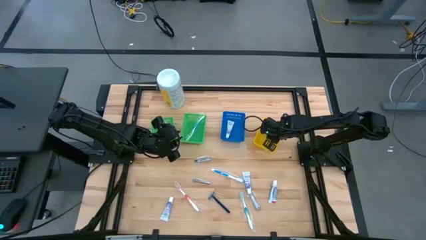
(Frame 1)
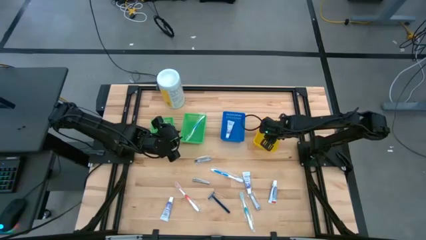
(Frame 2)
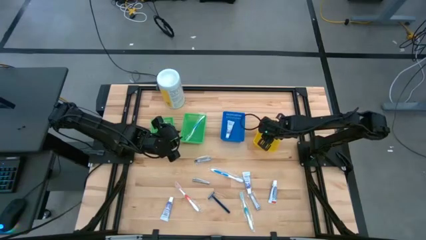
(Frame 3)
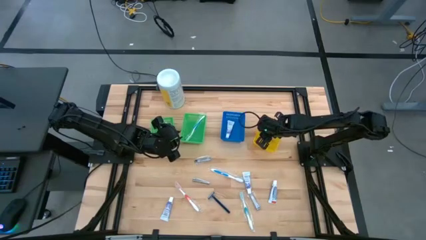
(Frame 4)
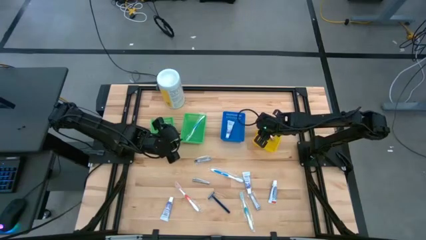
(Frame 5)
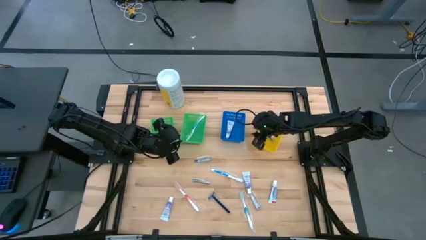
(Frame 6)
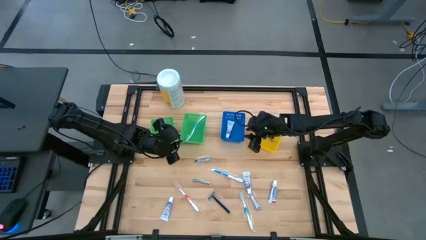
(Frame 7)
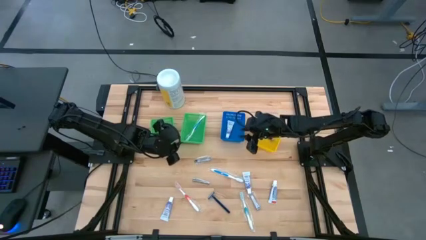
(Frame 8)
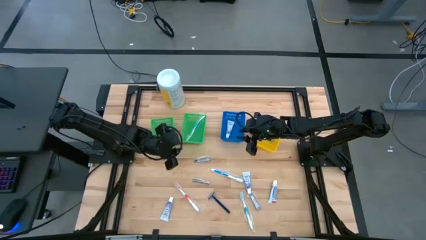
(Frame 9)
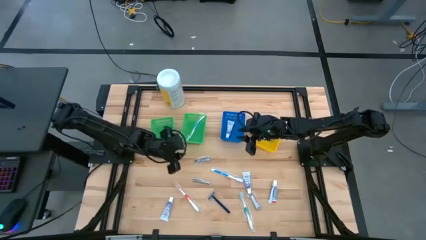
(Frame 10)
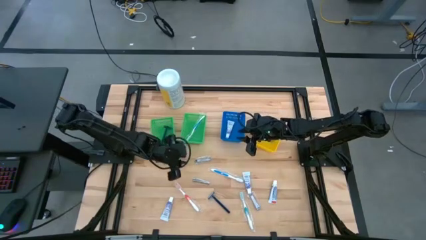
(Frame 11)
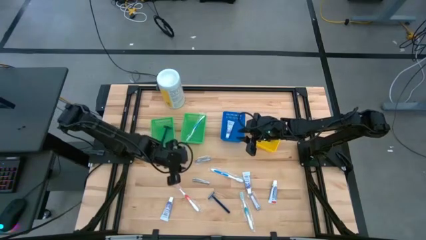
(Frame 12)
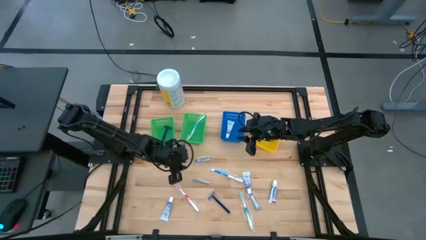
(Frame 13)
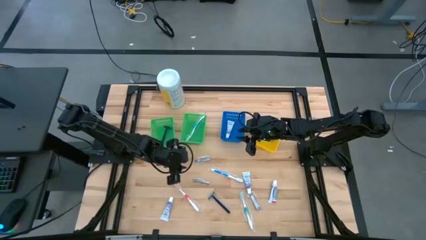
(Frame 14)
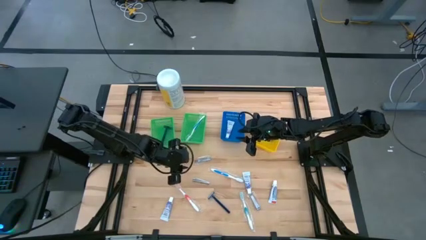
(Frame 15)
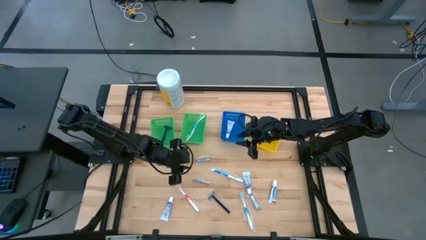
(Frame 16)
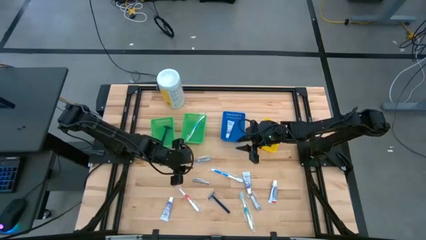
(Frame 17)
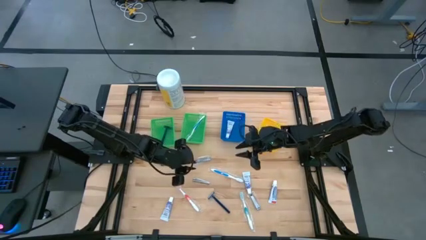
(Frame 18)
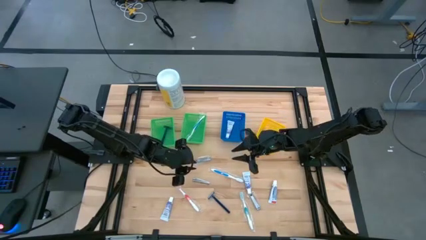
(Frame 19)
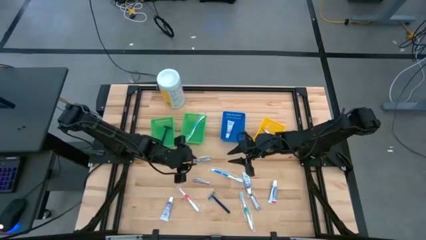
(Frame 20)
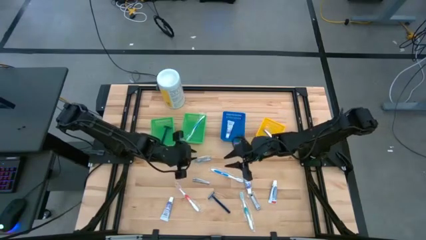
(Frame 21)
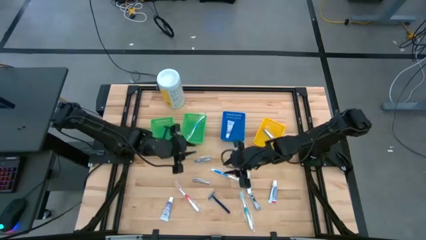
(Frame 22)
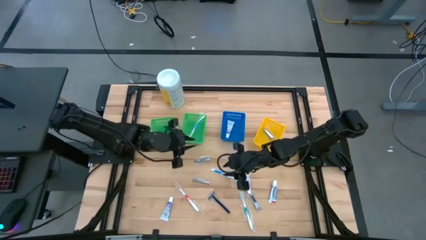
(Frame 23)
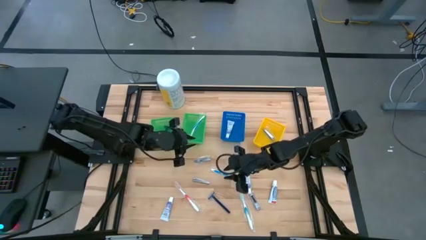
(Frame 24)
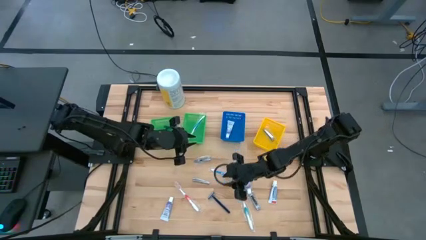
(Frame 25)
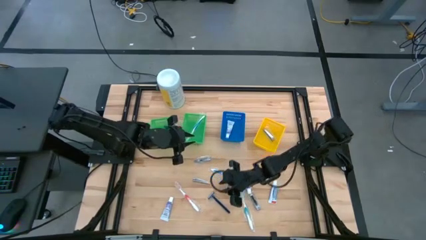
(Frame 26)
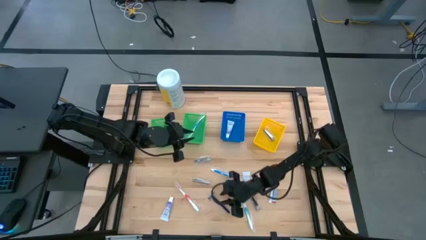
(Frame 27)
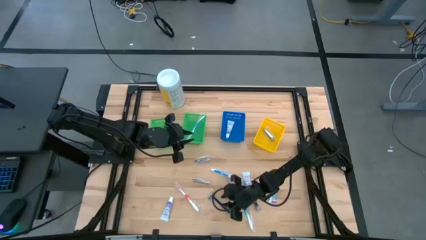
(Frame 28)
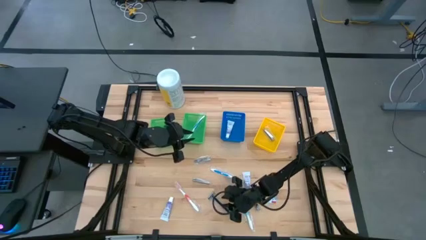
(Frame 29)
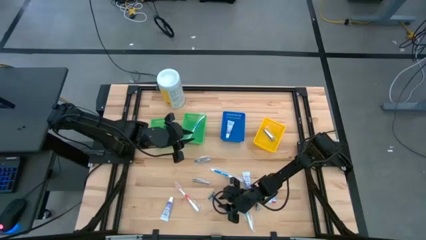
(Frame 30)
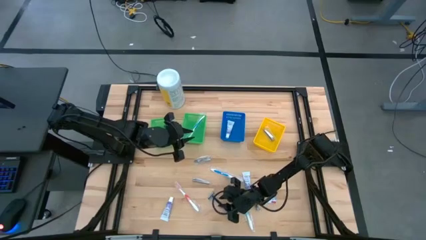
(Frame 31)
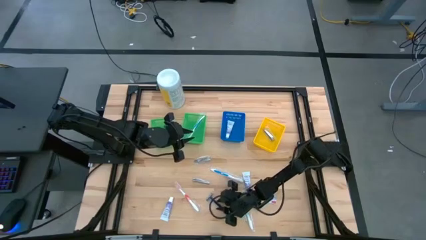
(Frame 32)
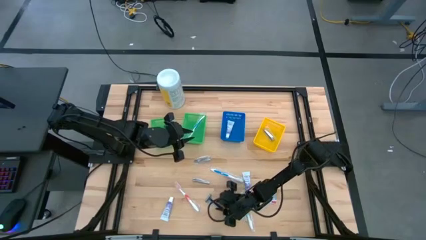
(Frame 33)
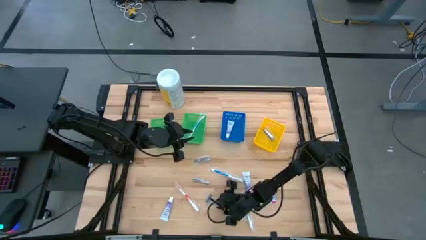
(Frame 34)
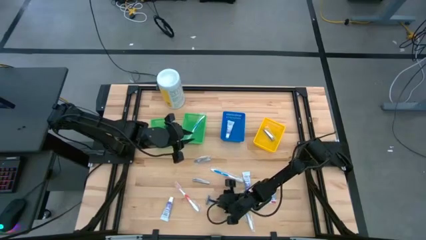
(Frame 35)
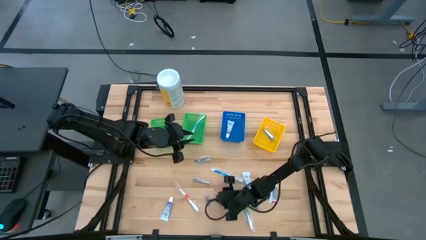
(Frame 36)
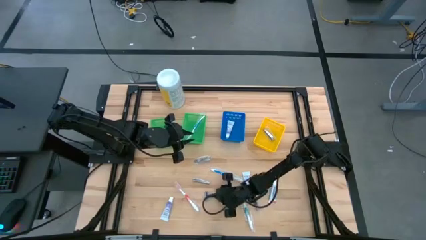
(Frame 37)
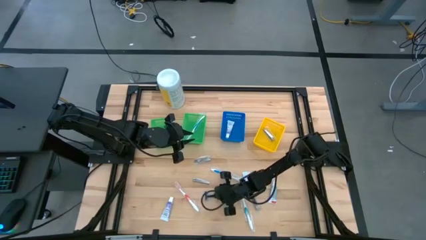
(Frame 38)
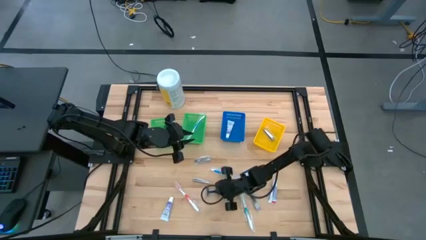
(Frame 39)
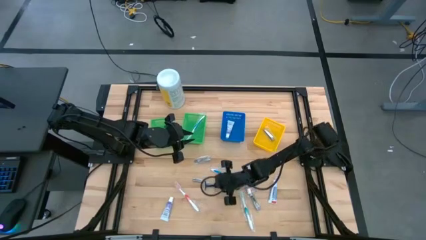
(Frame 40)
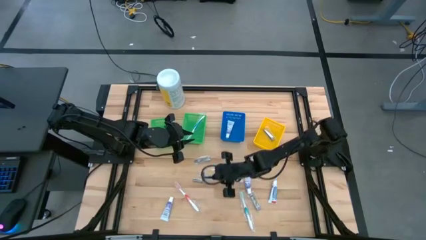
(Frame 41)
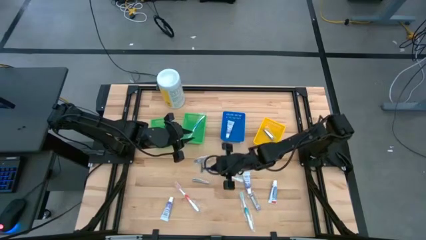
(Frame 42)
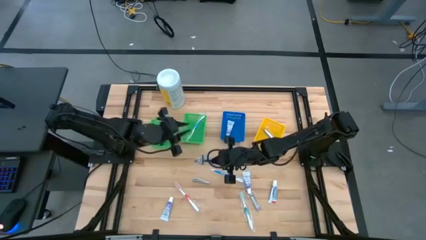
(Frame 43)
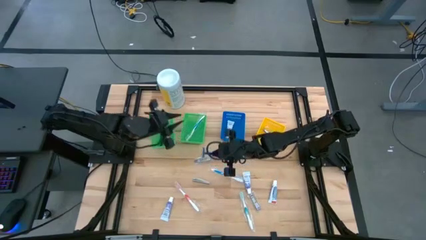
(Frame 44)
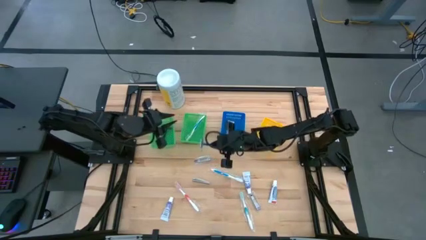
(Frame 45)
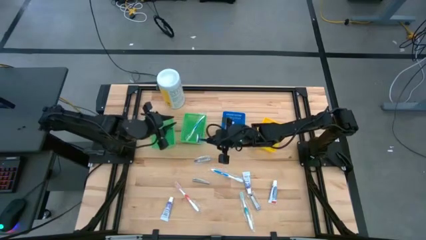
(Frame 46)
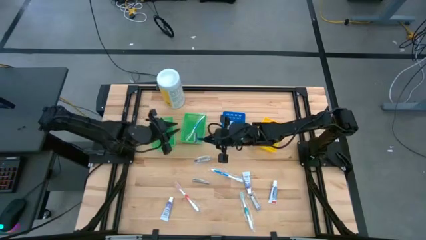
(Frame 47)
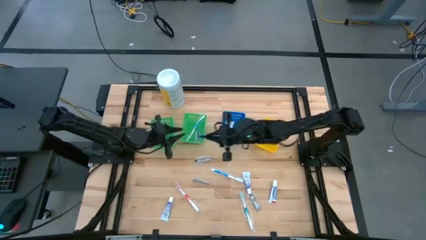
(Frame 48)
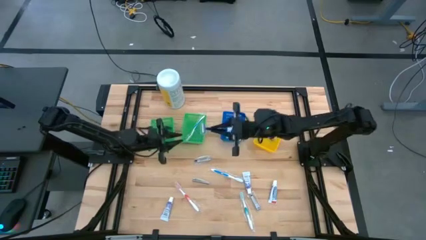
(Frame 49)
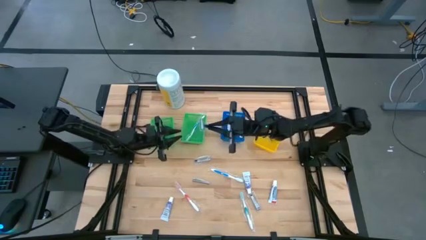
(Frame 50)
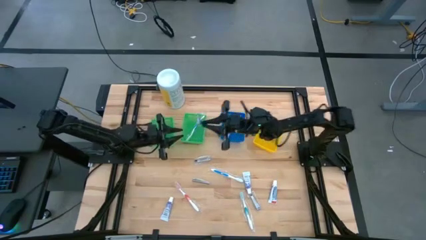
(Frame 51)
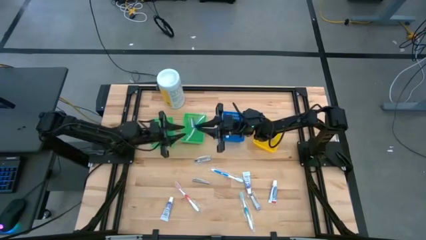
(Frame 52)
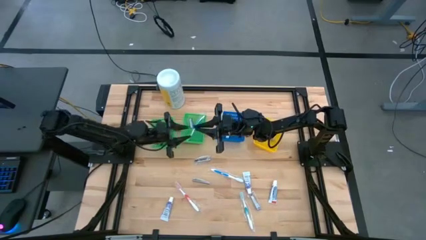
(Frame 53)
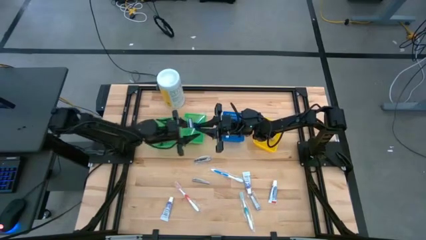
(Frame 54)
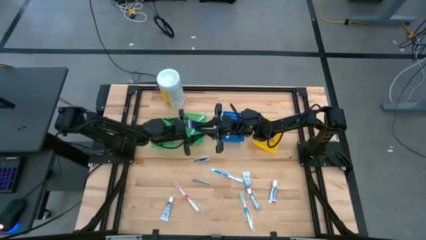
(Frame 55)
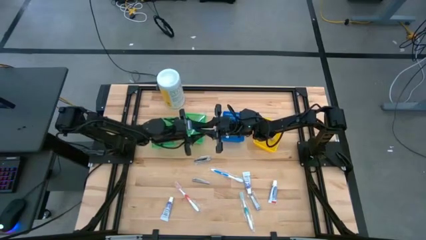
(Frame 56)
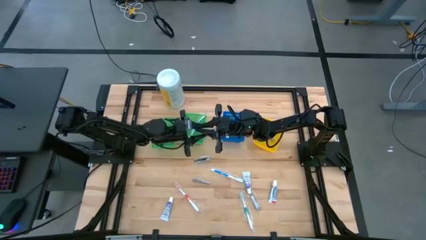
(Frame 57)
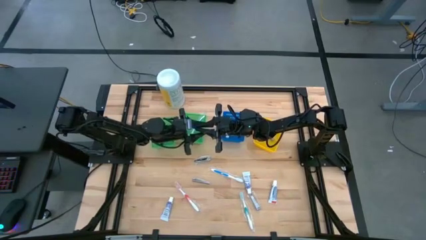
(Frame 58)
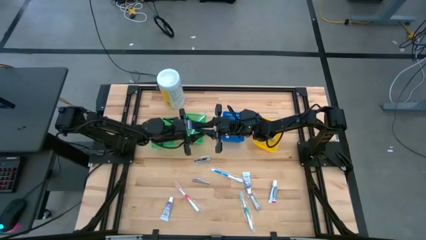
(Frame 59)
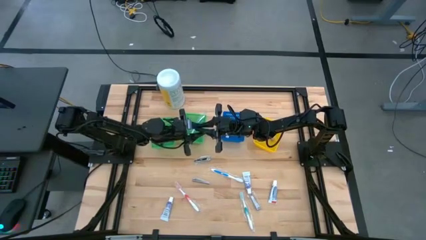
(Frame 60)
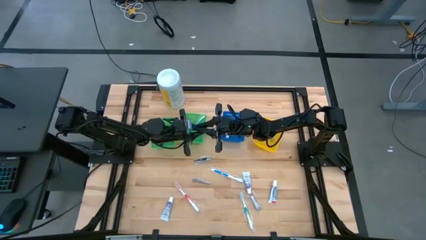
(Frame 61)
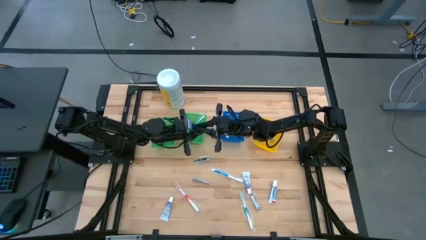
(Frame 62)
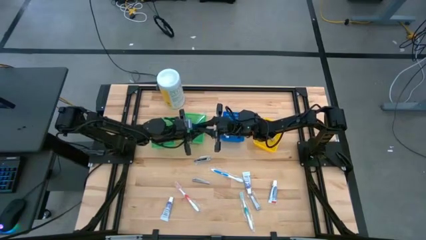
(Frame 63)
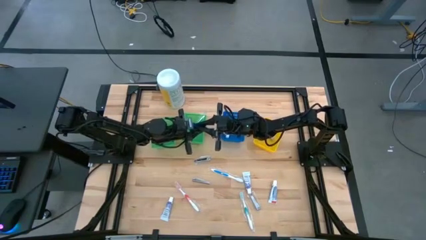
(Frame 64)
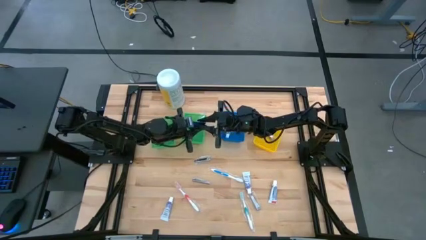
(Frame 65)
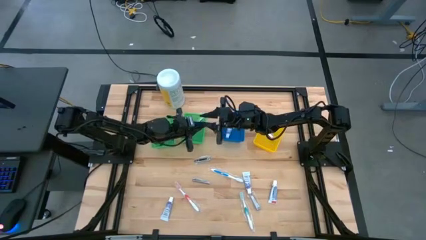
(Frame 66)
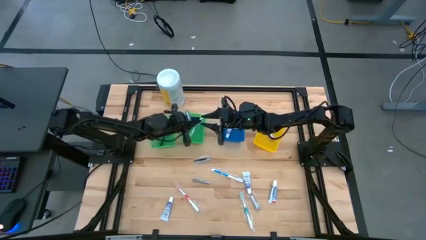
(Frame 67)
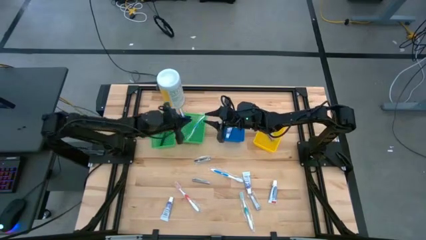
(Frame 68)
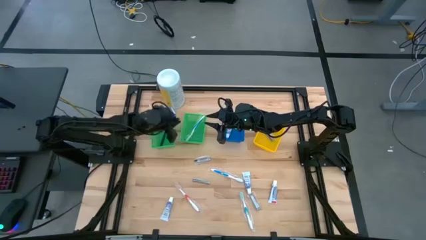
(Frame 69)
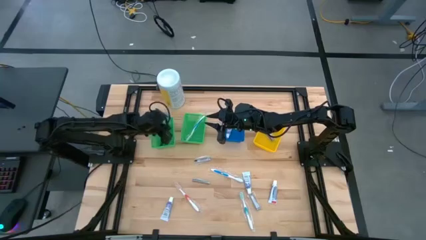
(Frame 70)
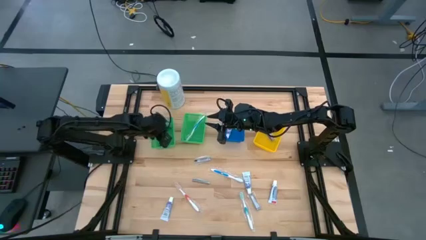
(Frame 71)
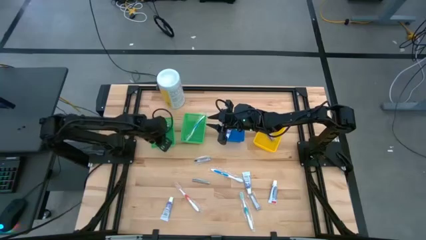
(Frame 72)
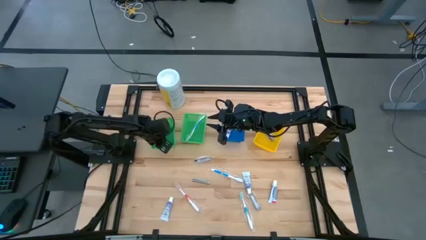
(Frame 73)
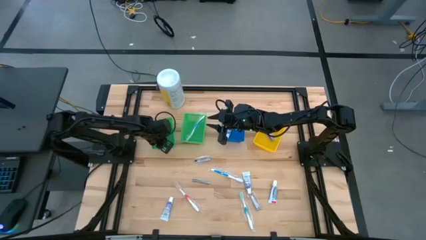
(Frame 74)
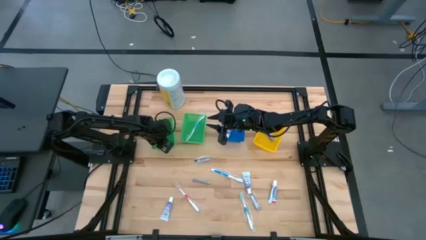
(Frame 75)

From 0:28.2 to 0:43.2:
Task: Pick & Place Travel size toiletries
Put the blue razor into the left green bin
